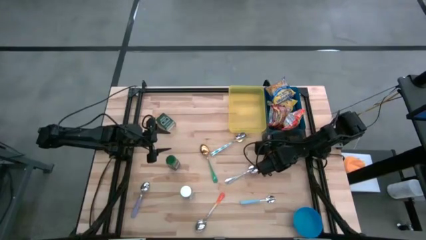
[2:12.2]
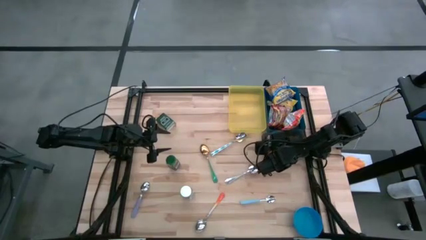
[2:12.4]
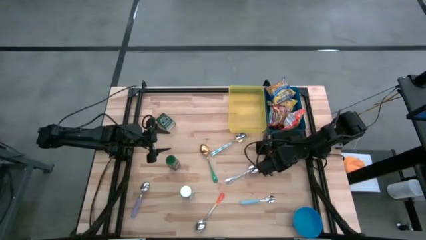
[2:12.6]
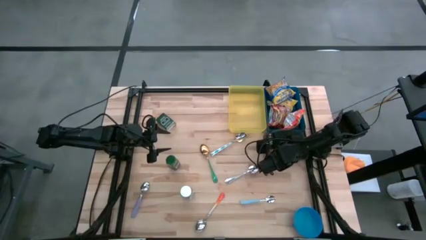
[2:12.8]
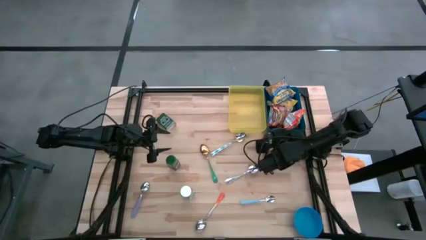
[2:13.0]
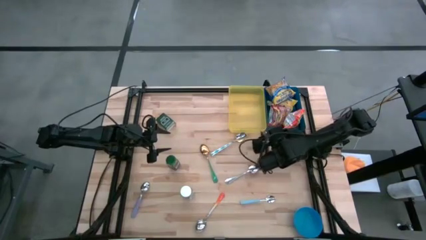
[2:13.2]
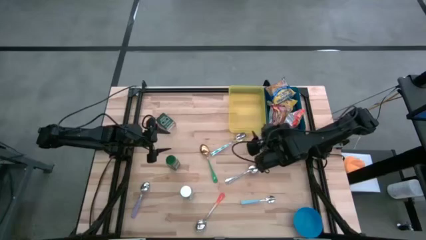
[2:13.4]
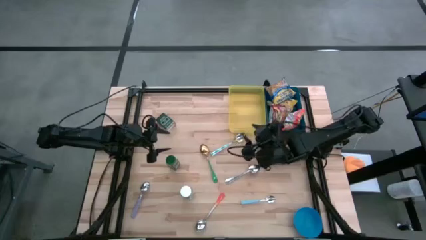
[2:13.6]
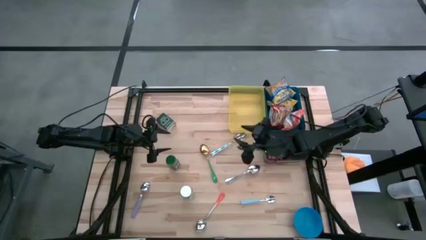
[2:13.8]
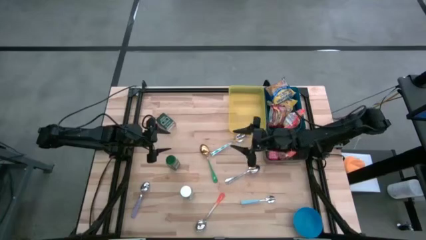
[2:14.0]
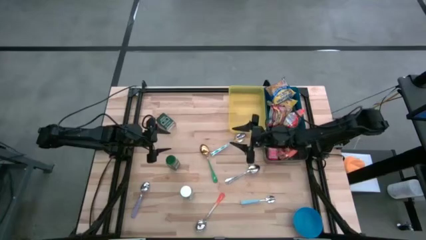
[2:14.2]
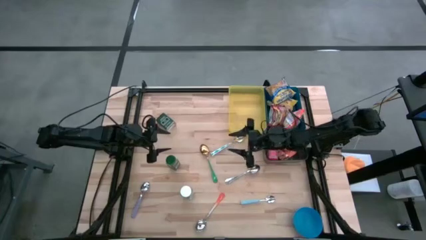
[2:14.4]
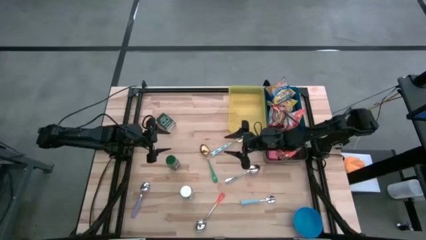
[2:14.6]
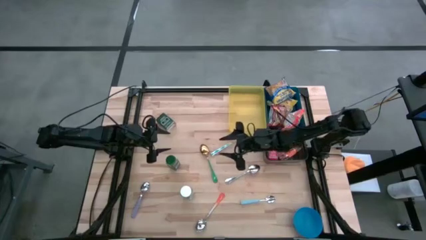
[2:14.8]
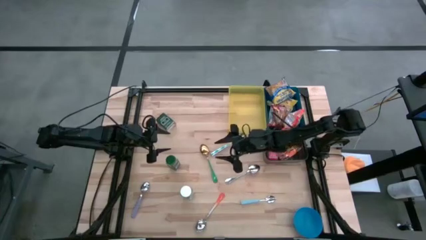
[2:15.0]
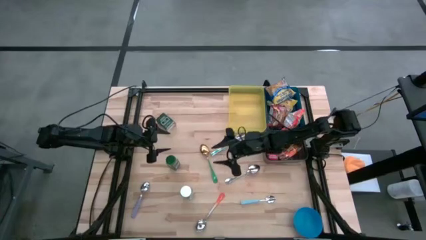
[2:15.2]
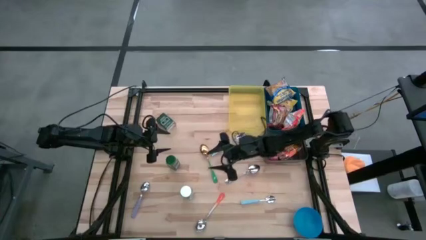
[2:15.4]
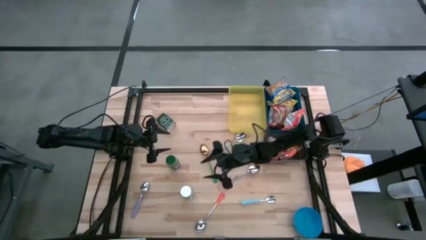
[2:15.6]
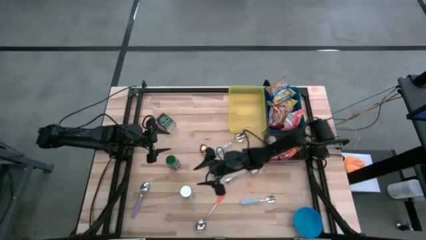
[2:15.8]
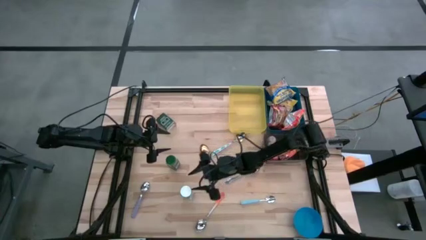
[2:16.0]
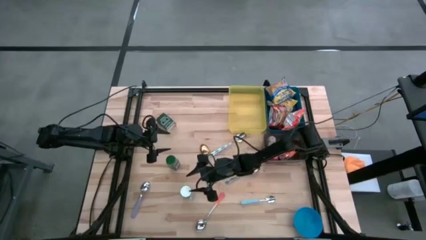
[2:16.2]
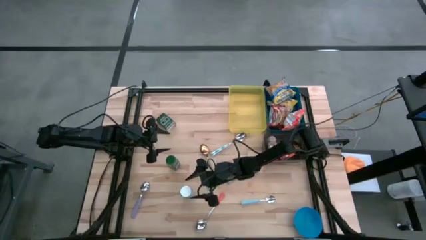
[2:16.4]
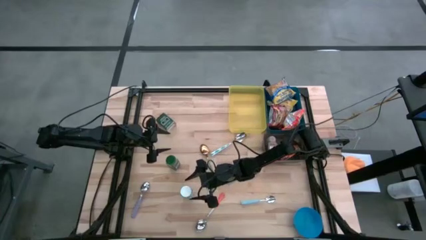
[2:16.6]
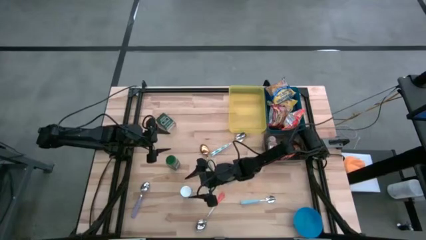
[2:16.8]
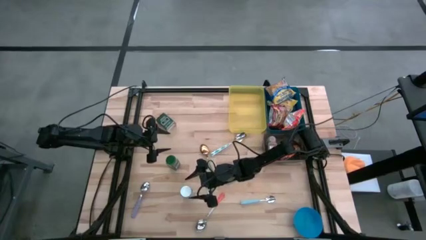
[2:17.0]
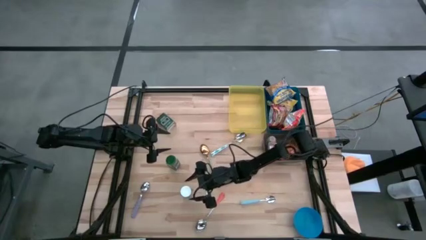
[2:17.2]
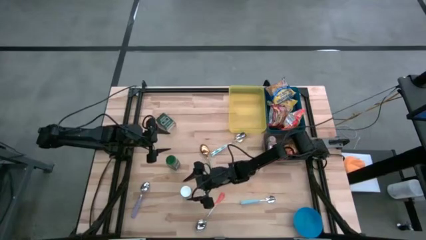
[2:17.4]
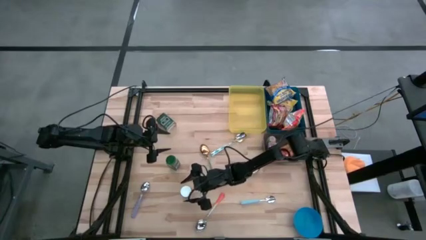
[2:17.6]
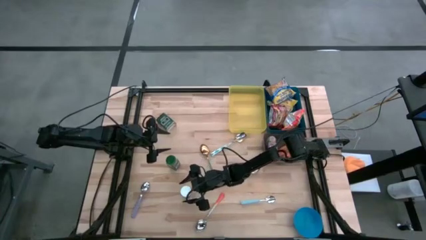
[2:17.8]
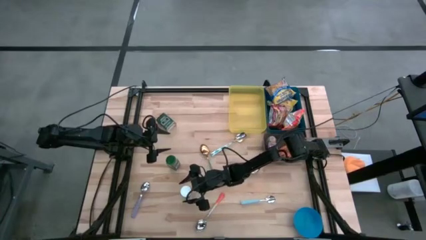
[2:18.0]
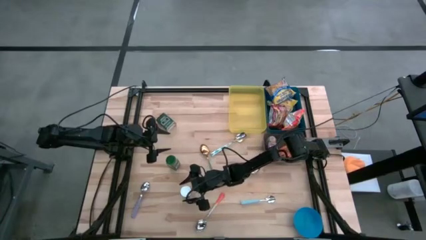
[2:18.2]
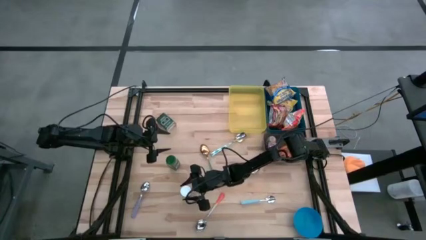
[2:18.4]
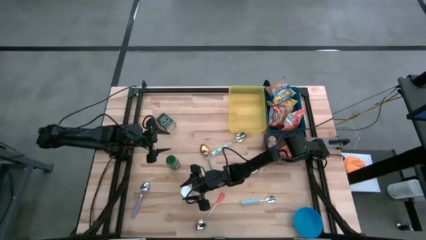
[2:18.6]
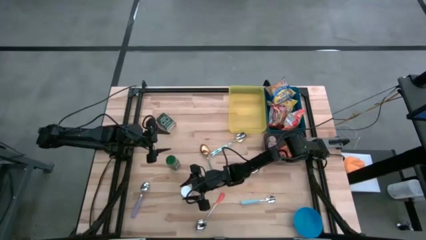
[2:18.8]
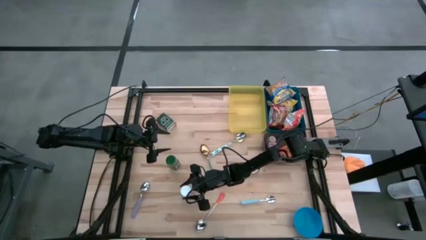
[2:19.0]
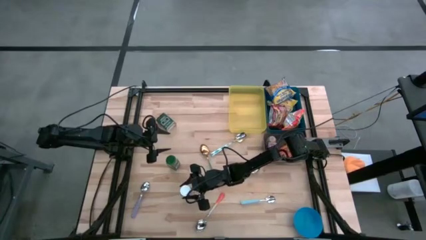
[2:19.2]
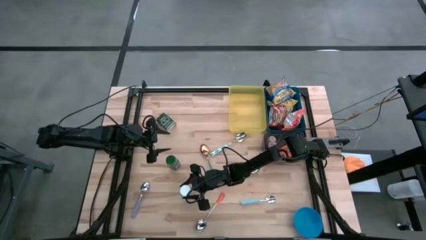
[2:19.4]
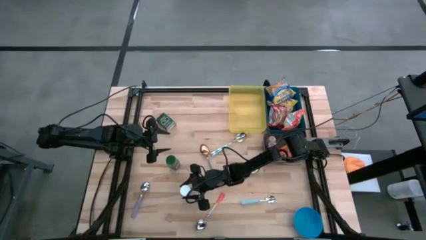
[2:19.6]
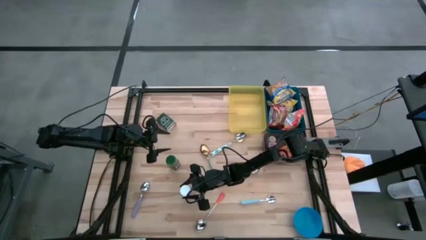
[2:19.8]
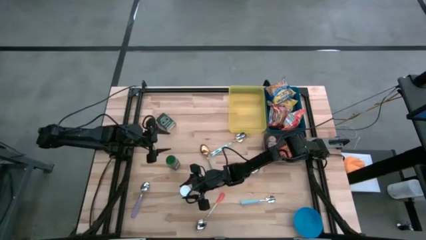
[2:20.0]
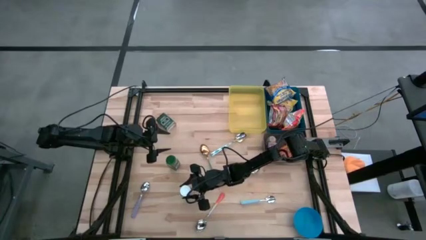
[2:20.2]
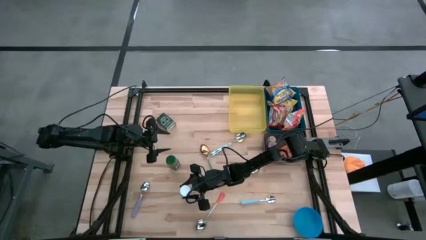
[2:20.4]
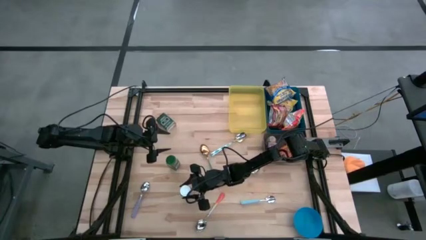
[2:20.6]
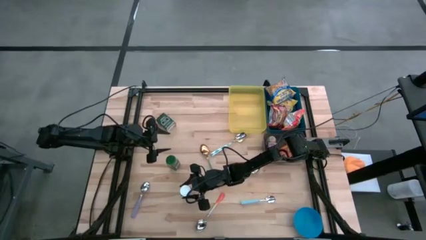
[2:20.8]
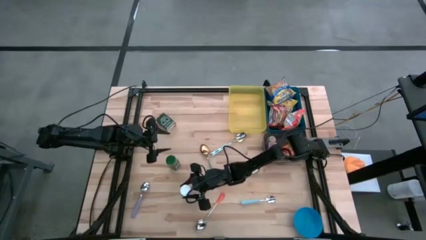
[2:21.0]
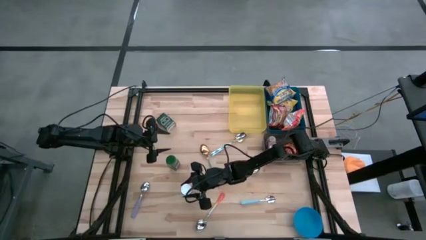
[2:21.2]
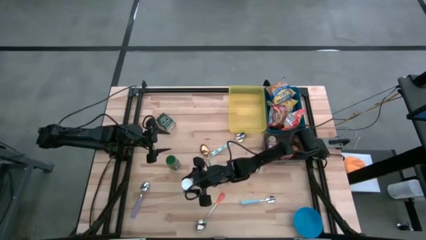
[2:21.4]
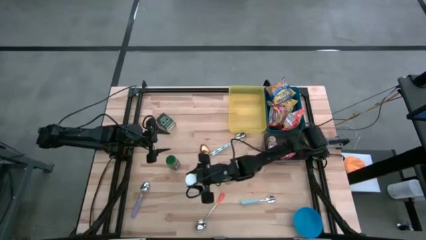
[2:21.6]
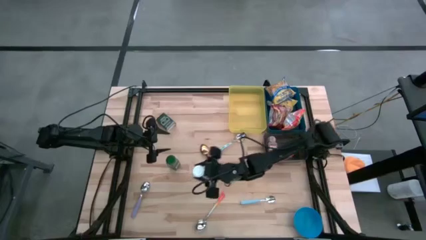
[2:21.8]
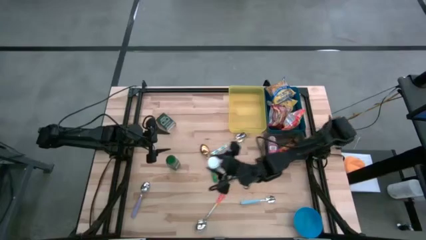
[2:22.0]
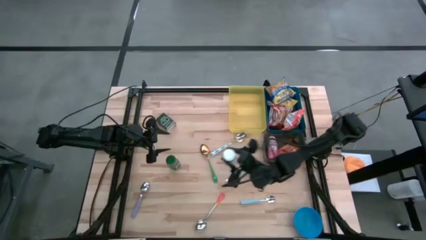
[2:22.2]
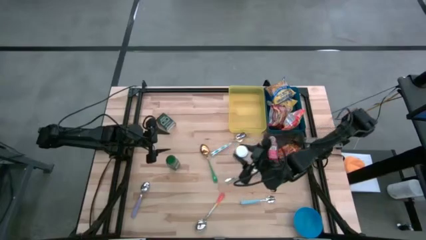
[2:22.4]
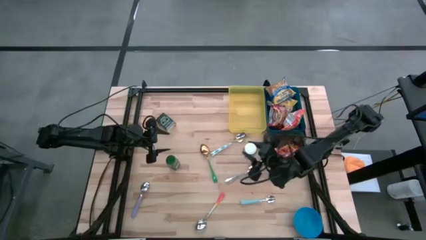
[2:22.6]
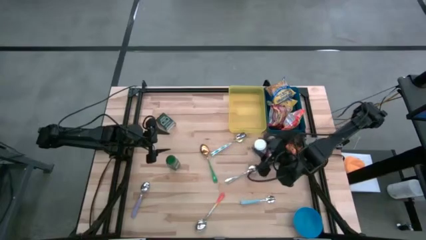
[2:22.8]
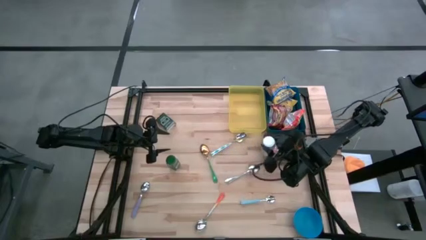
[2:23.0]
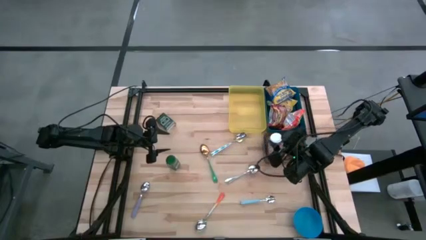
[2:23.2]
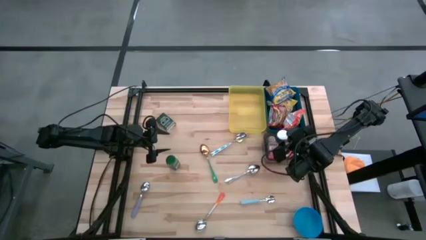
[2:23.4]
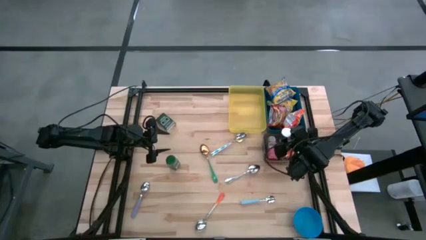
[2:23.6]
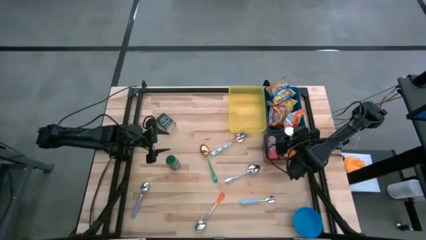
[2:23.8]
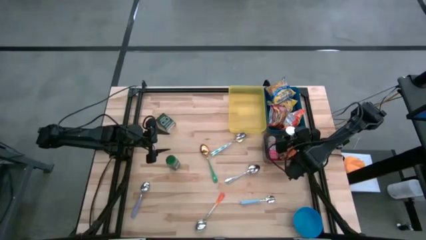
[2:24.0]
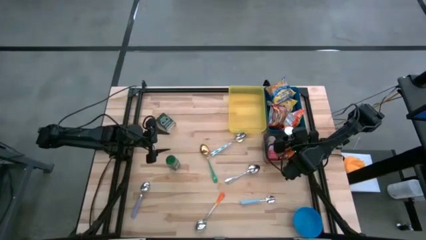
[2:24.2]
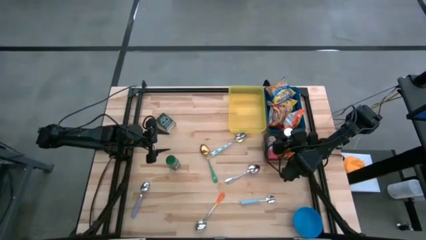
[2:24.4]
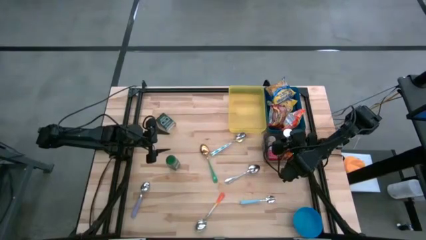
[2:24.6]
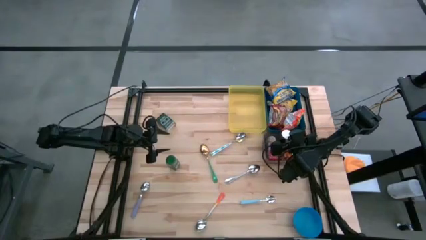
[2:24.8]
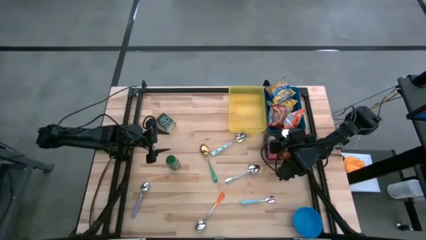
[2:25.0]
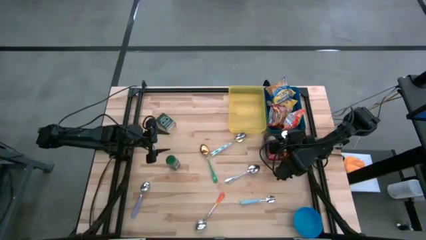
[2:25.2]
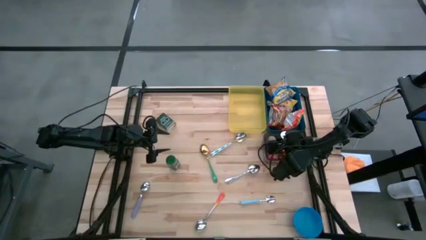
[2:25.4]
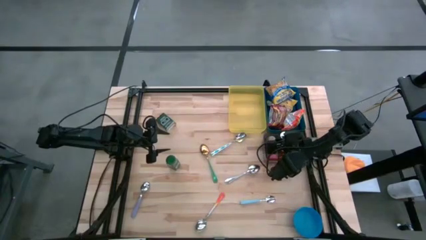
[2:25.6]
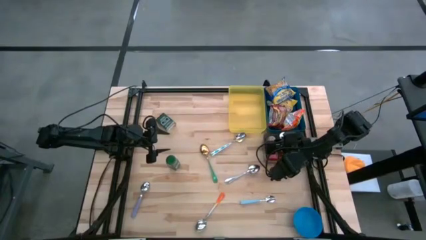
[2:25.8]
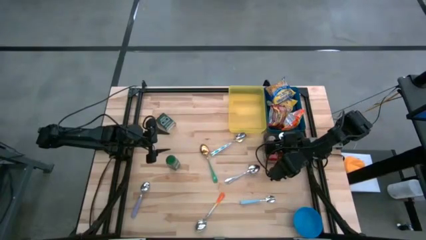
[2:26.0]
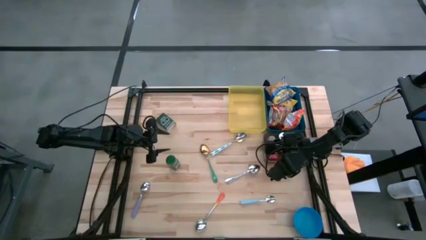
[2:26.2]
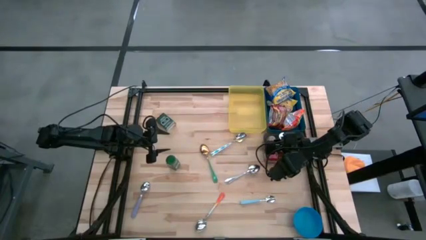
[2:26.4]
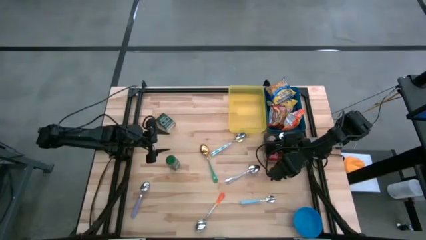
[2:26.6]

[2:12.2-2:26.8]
Put the white seasoning bottle into the black bin
